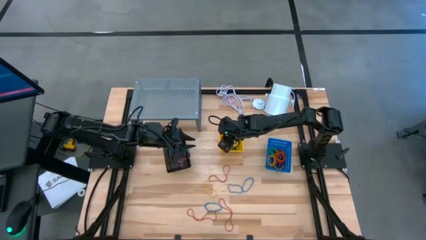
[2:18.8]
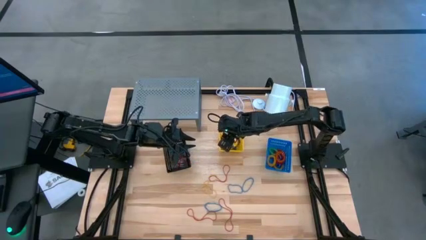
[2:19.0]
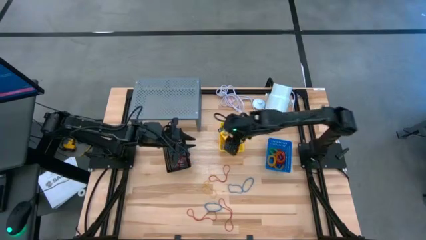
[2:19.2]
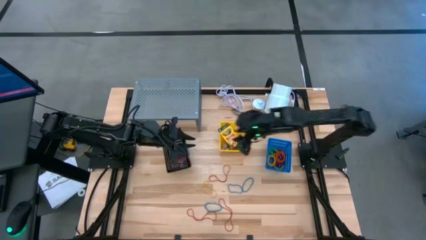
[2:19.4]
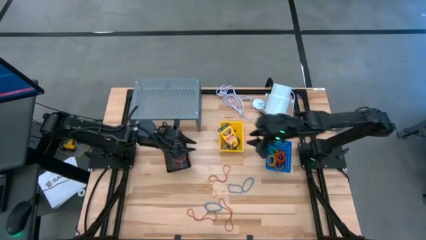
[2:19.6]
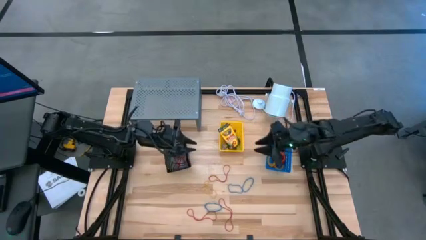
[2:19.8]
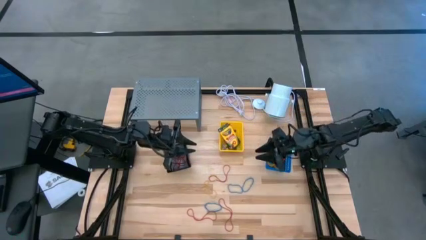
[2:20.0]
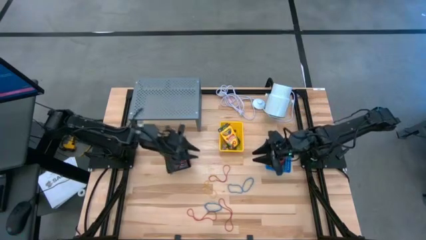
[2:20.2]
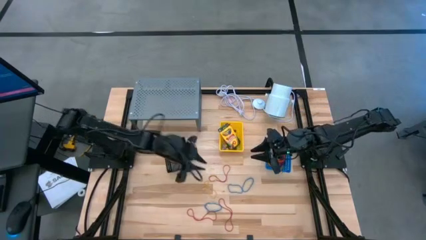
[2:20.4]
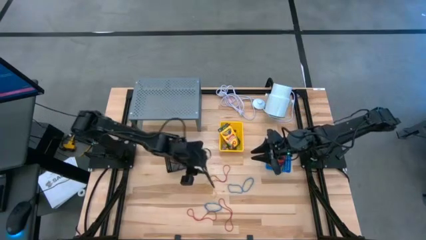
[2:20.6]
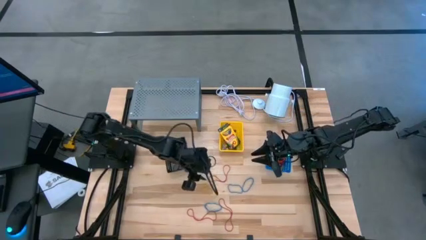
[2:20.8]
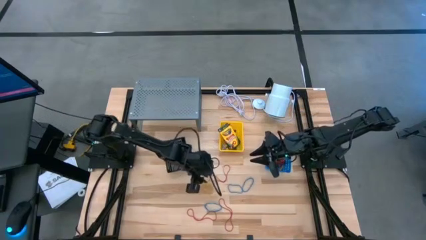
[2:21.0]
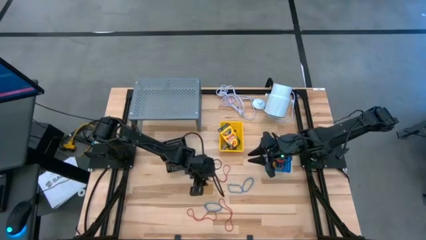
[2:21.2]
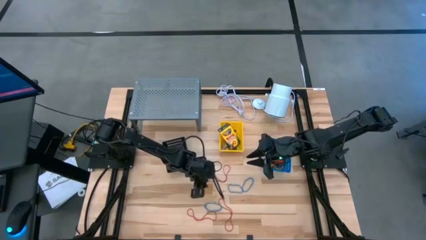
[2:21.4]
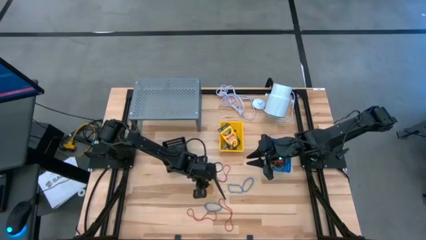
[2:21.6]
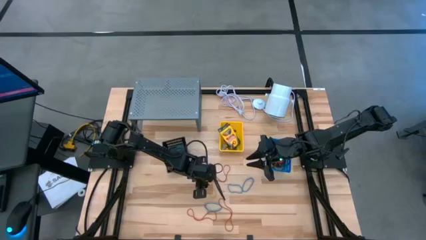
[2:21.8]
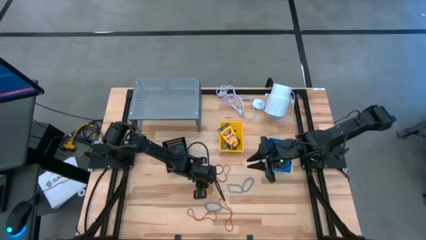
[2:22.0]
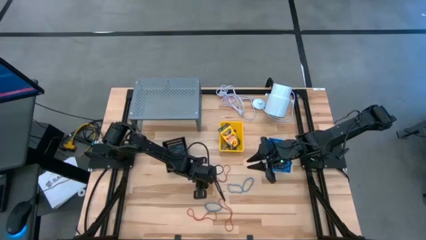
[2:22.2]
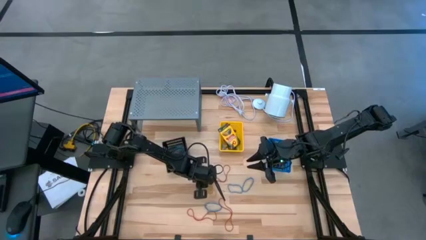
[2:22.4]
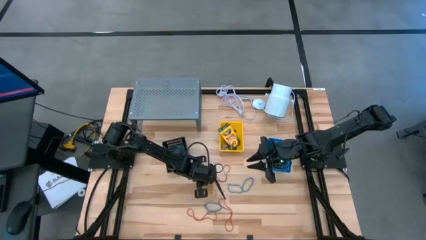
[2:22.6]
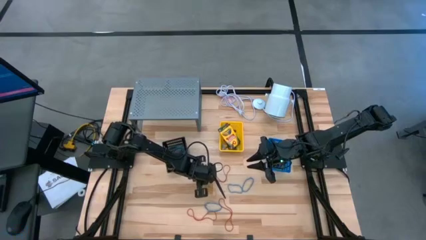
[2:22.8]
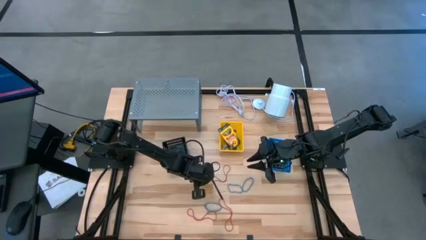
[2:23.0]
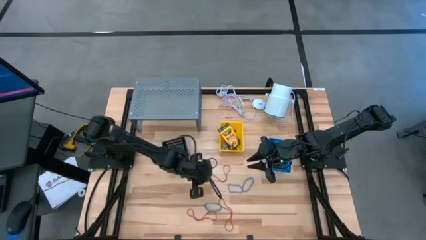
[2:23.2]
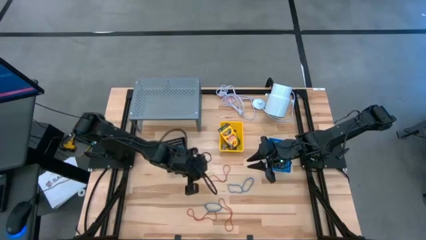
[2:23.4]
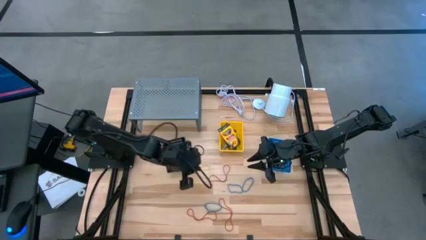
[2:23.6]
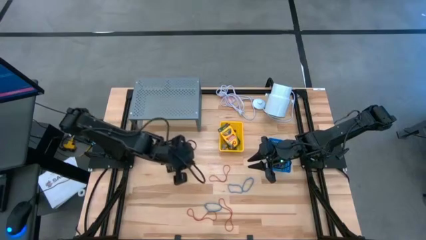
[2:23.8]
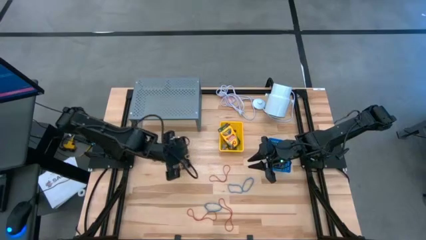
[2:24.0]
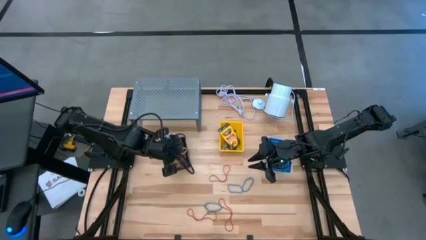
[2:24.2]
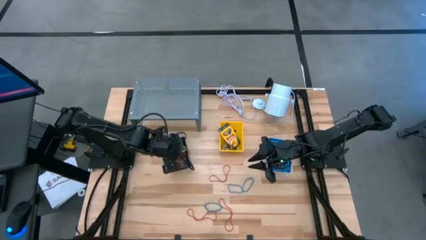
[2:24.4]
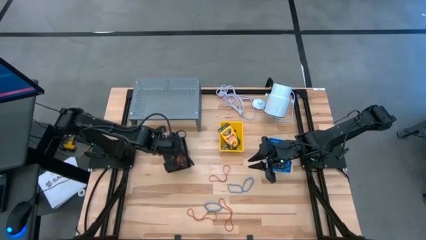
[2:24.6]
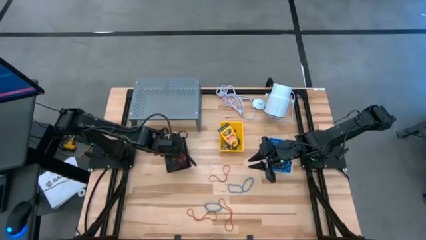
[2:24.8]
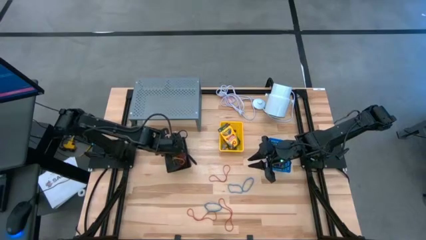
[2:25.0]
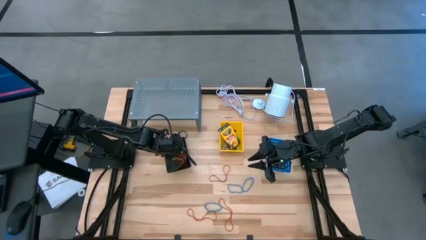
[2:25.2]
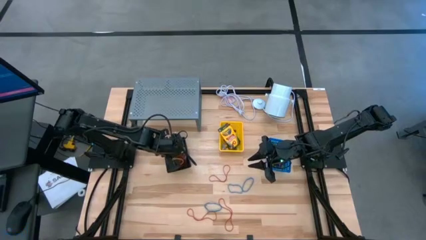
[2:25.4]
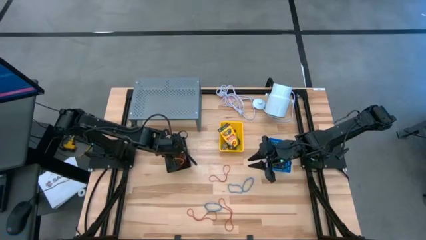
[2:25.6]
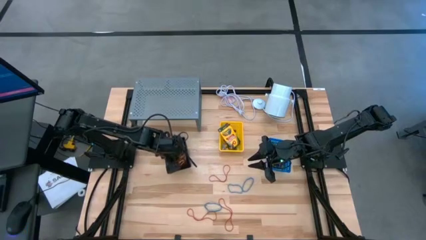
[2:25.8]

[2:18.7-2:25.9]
Task: Pick & Place Office Desk Supplies
Put the yellow rubber band into the black bin

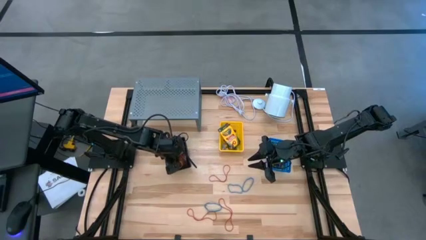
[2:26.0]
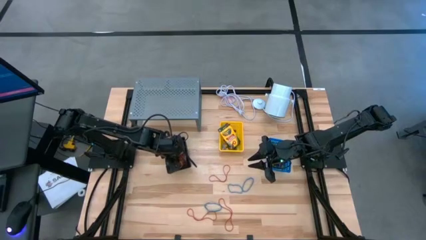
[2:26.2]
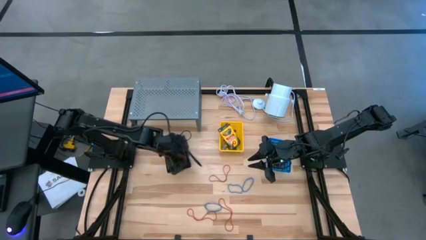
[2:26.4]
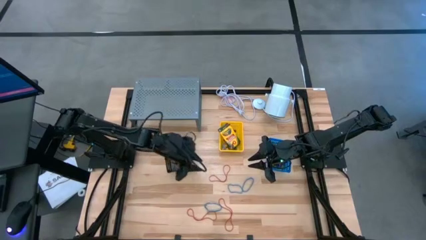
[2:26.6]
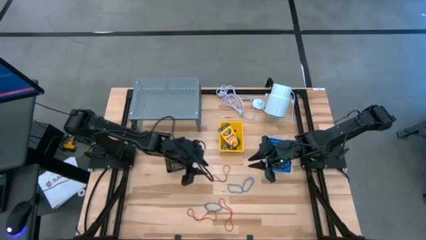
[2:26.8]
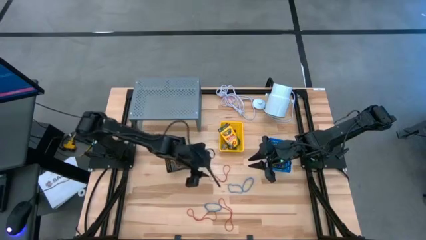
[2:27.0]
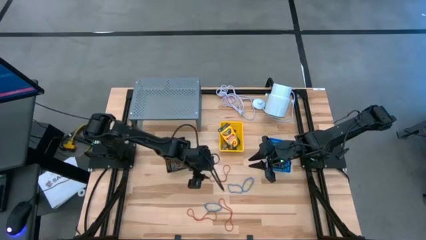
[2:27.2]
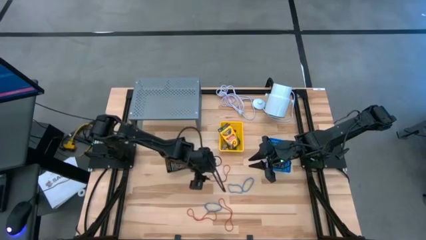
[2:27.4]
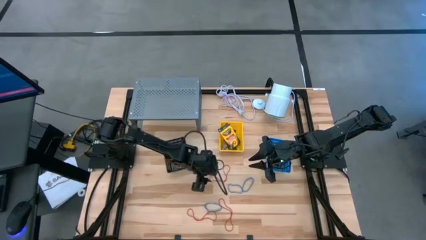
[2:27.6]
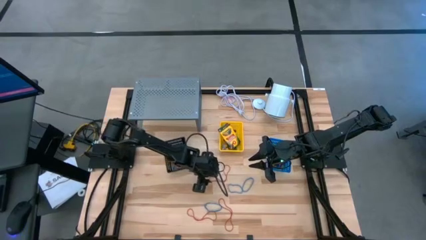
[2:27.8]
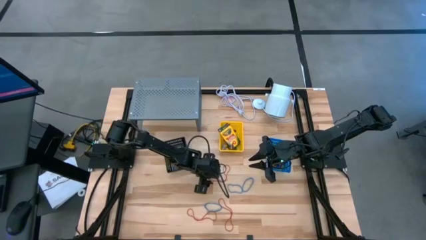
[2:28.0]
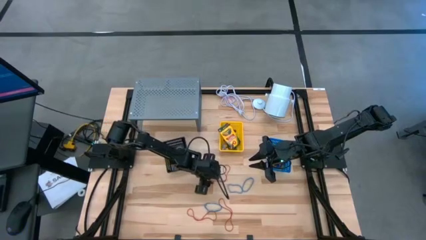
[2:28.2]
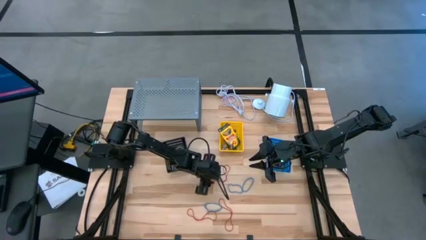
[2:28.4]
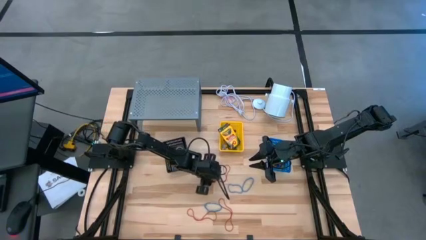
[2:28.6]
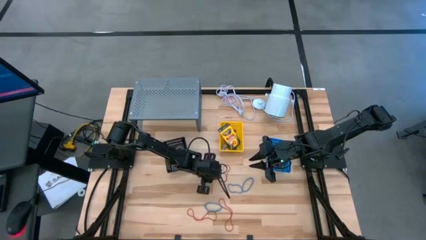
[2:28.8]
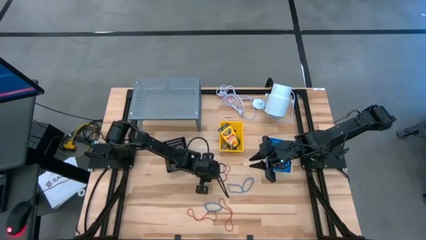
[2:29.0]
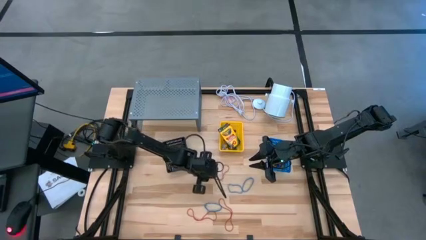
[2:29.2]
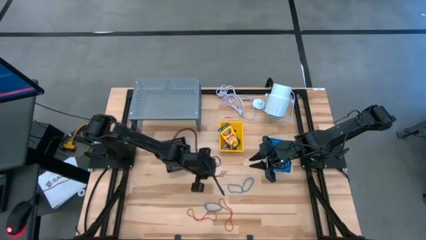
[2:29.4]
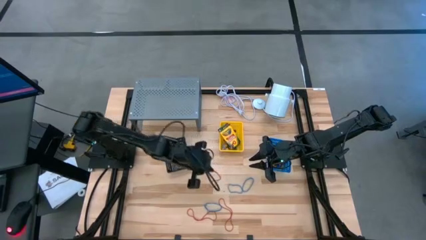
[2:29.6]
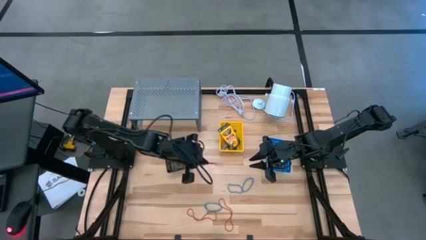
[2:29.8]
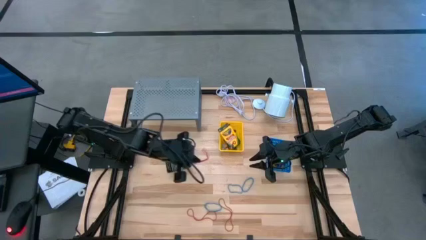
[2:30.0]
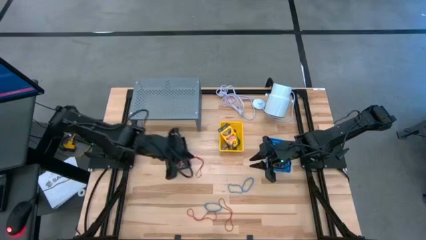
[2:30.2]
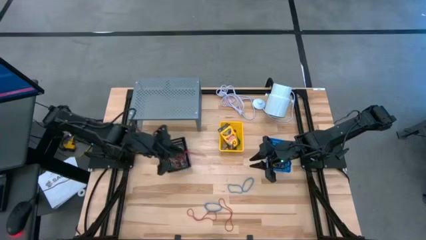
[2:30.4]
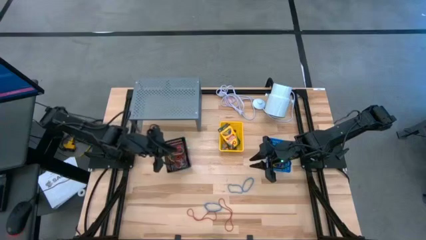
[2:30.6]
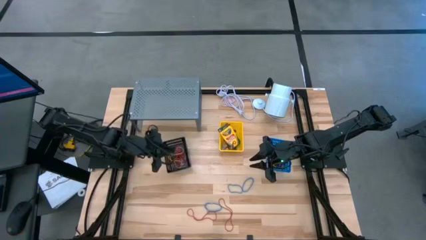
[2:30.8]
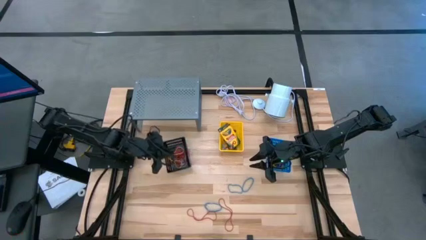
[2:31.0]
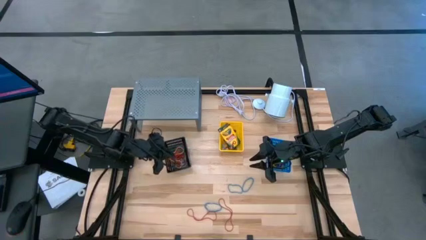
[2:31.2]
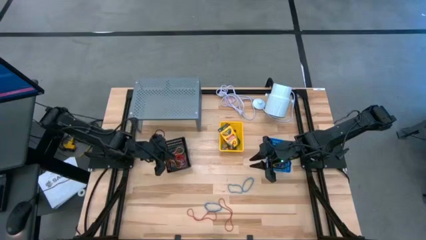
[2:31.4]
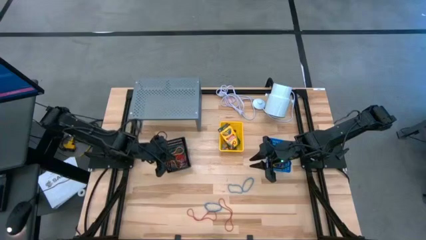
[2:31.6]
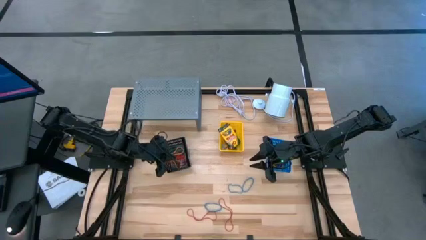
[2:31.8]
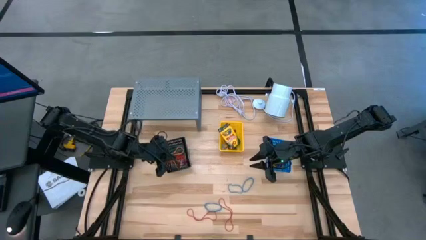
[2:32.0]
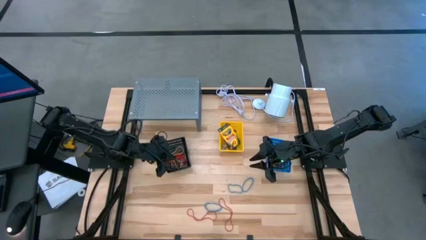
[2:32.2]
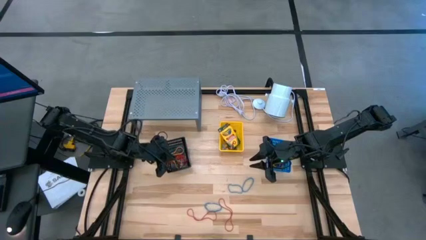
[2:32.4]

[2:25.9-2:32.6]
Put the red rubber band into the black bin
